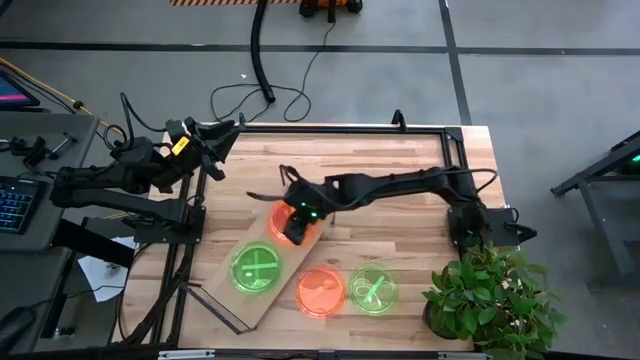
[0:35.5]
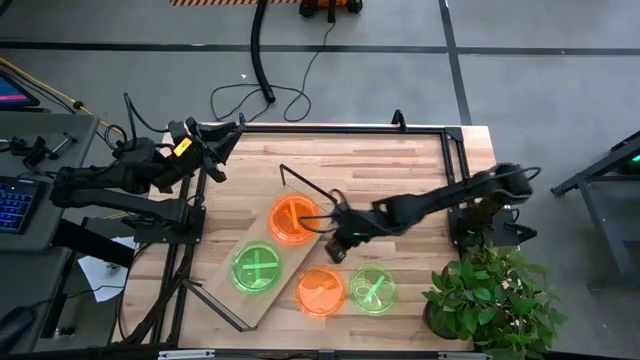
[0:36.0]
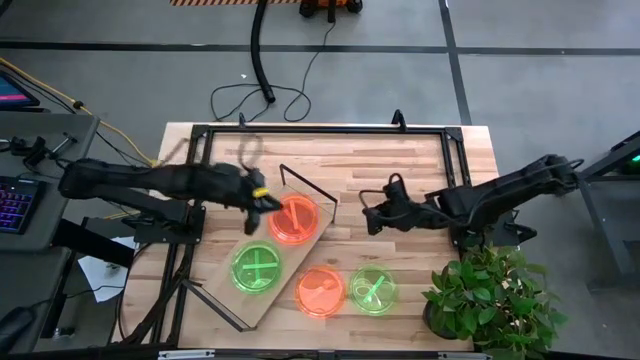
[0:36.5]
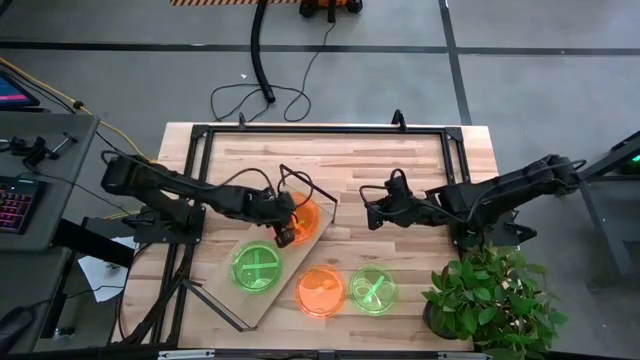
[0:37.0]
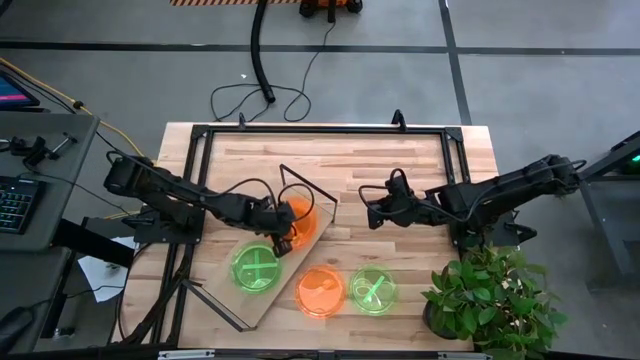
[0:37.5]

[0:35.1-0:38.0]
Task: Place and stack plates onto a shelf
Adjust the stacked orange plates on the shelf

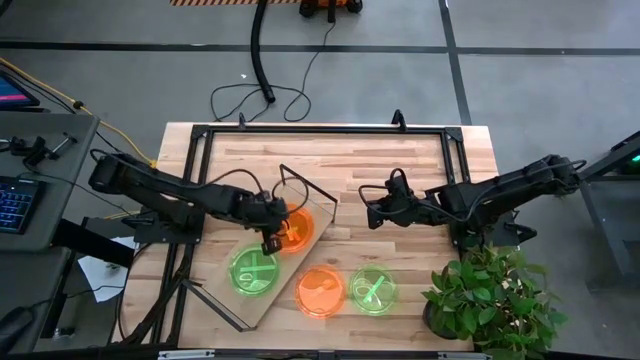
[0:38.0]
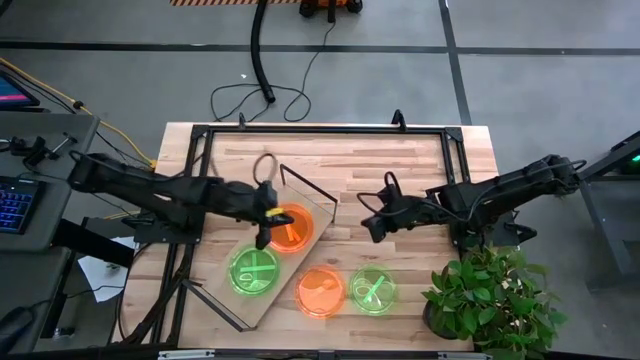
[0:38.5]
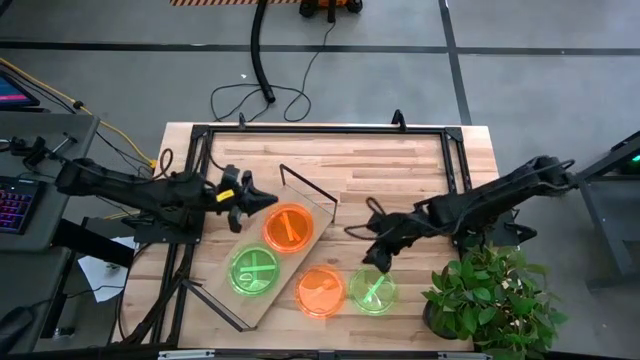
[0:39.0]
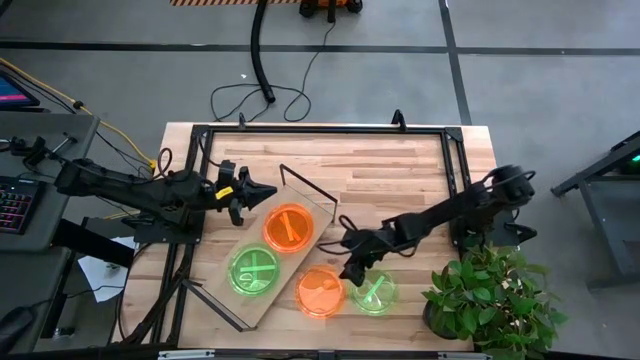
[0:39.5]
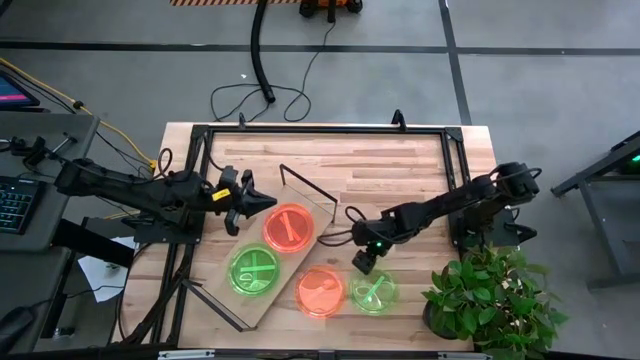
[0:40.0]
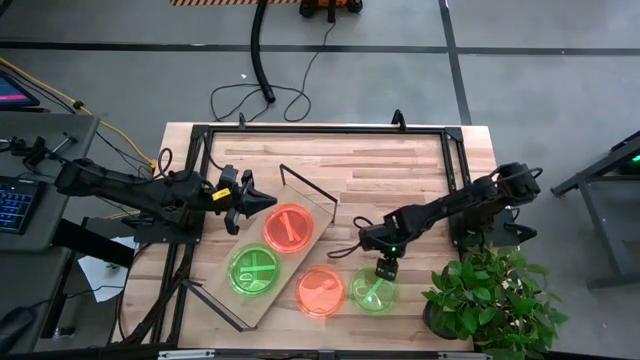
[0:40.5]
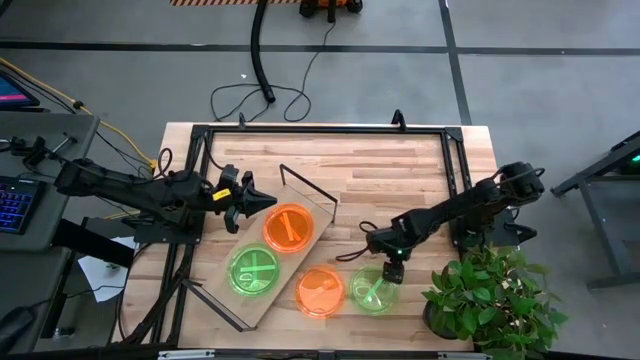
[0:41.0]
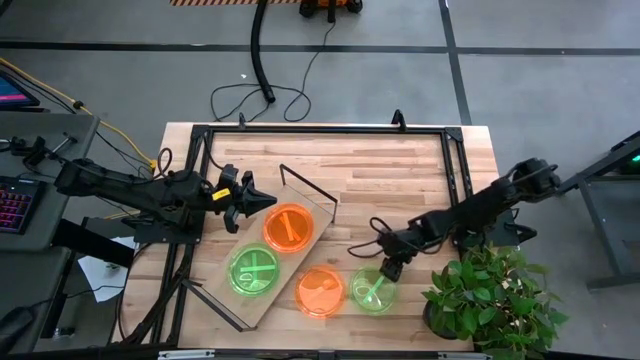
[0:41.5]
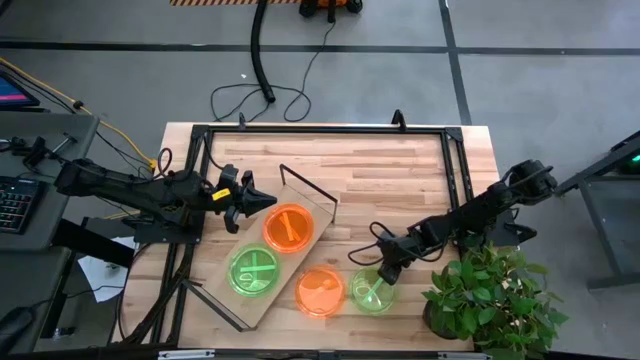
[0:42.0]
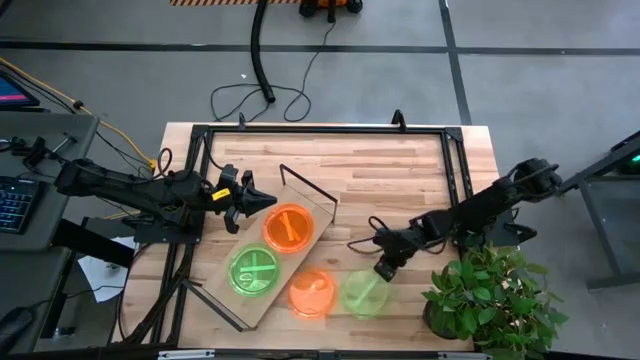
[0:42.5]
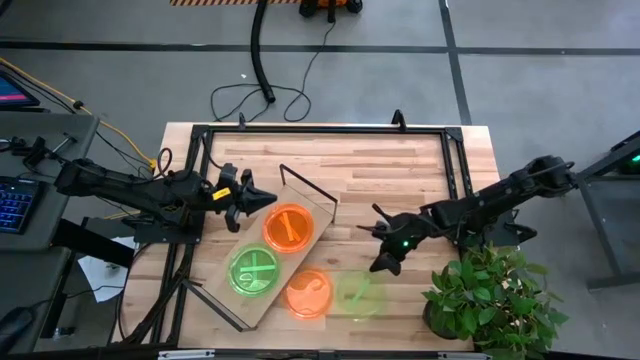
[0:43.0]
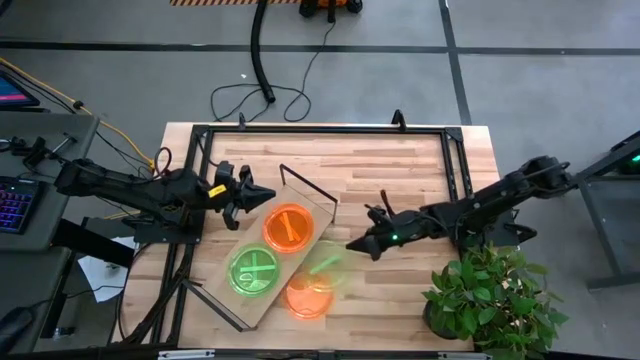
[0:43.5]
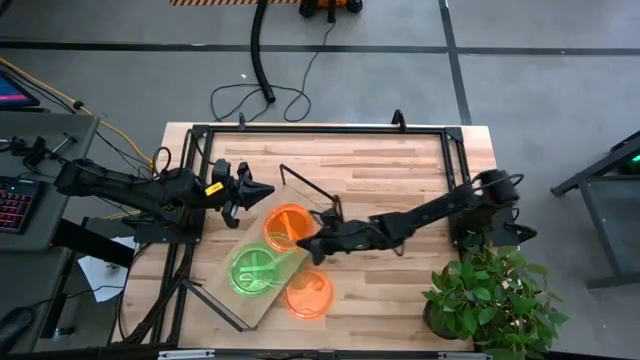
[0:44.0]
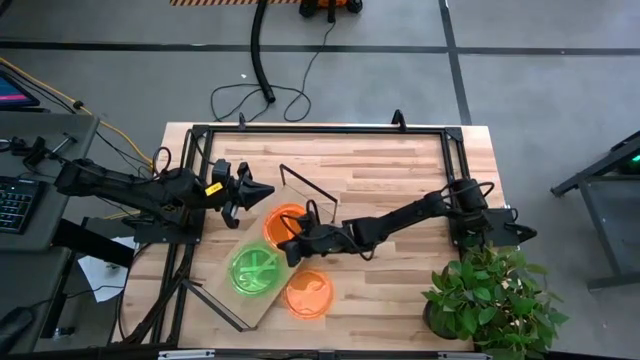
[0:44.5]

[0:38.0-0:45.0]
Stack the green plate on top of the other green plates on the shelf

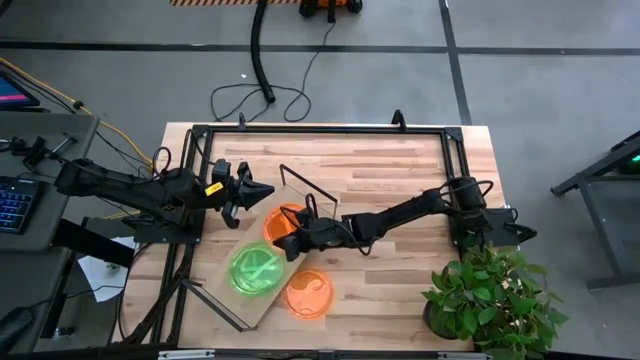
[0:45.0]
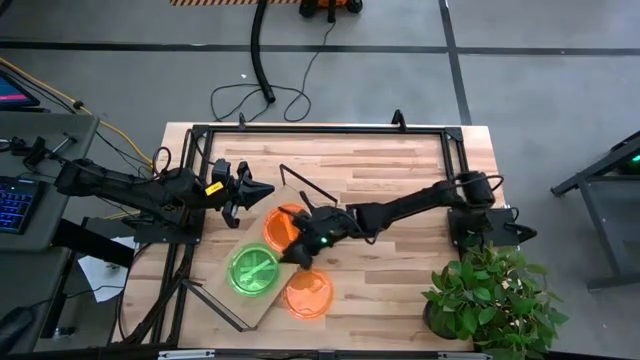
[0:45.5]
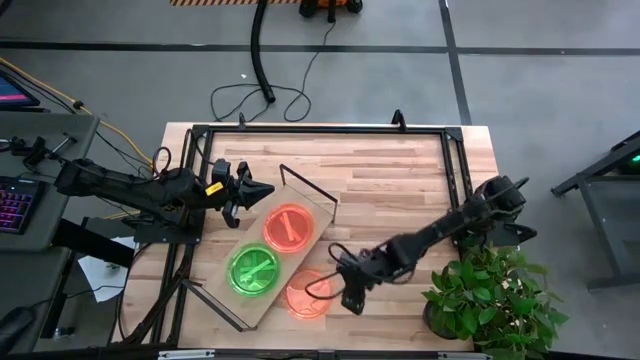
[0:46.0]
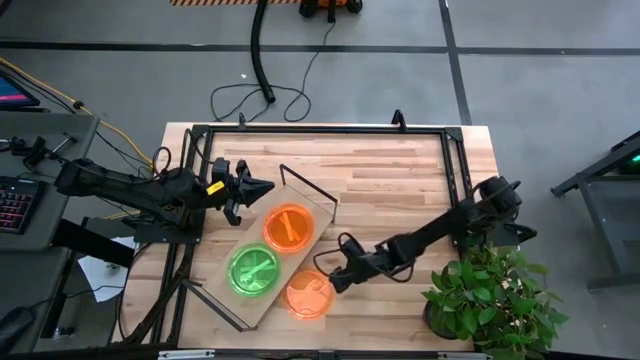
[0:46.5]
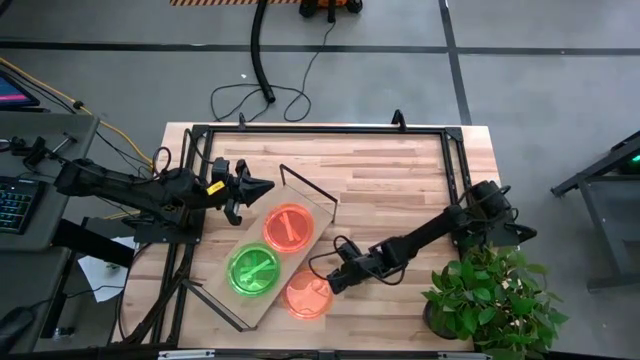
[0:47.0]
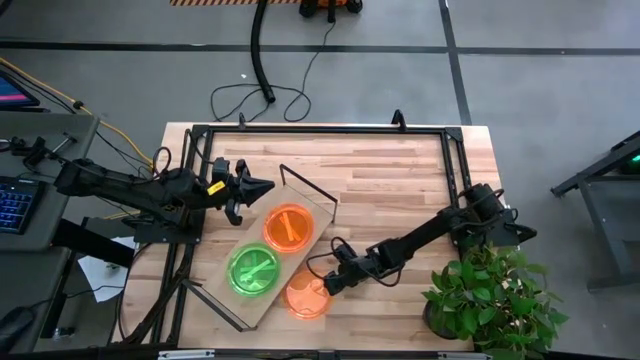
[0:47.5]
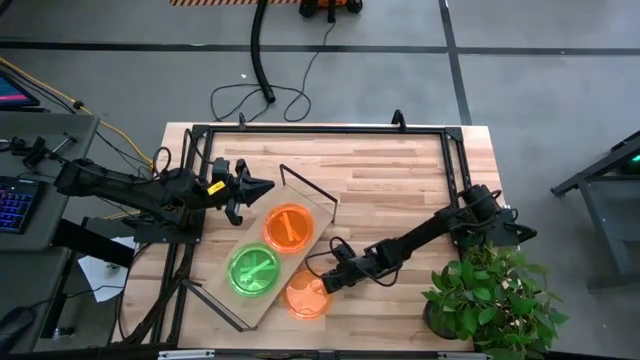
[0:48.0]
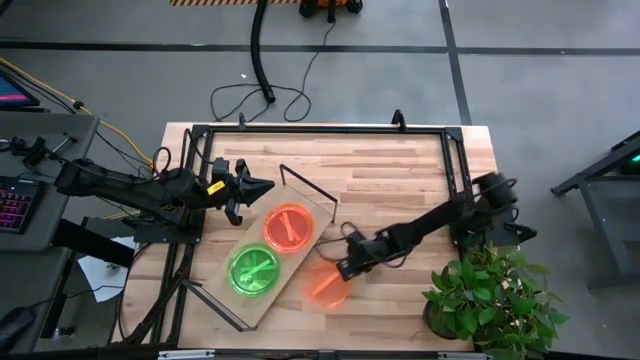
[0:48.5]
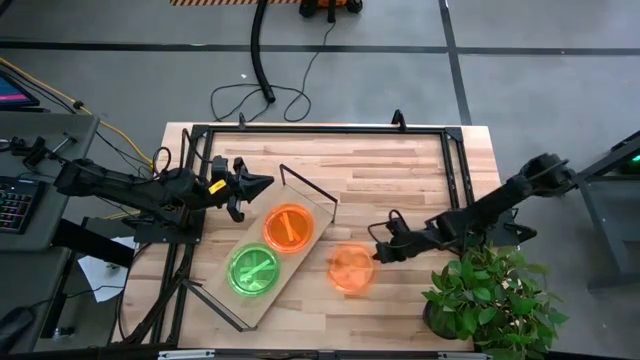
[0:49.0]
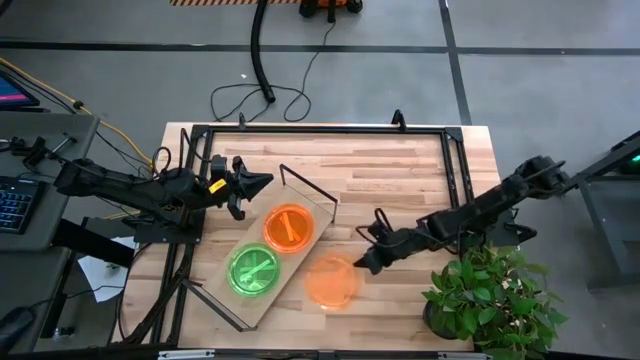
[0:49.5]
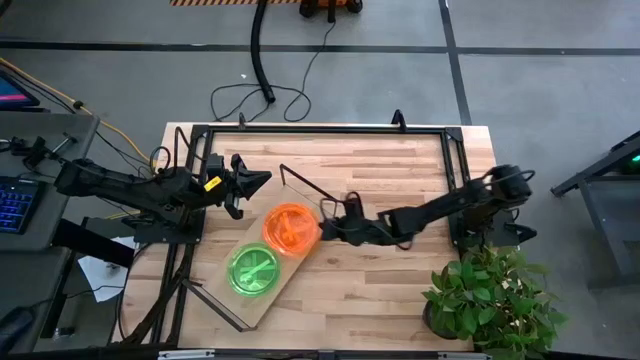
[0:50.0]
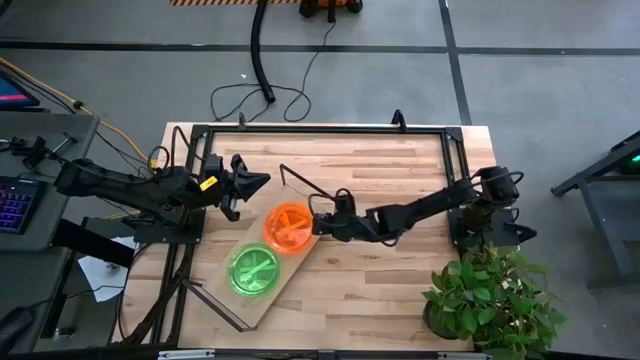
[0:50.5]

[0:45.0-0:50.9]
Stack the orange plate on top of the other orange plates on the shelf

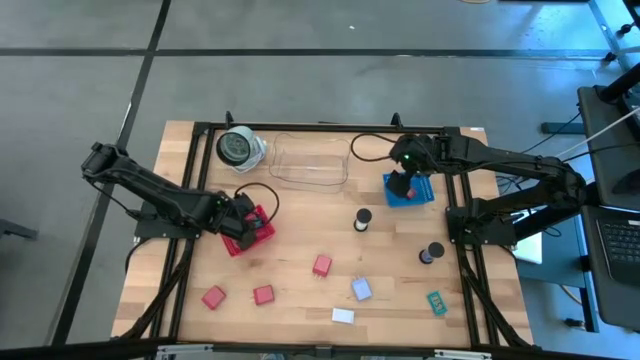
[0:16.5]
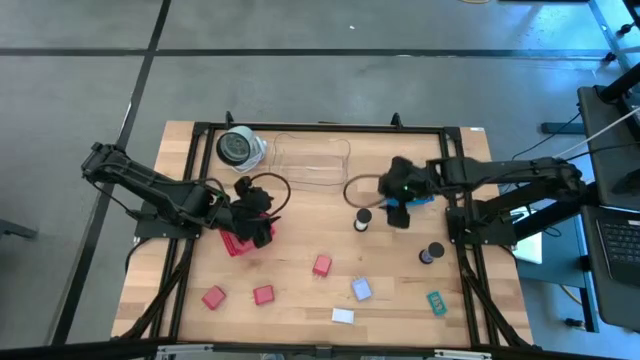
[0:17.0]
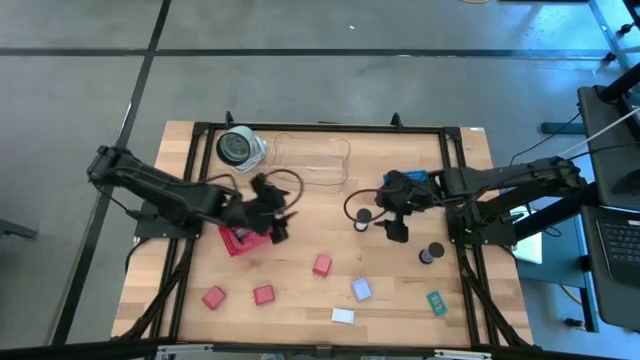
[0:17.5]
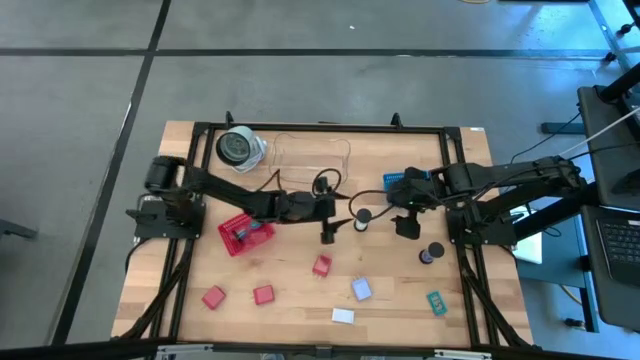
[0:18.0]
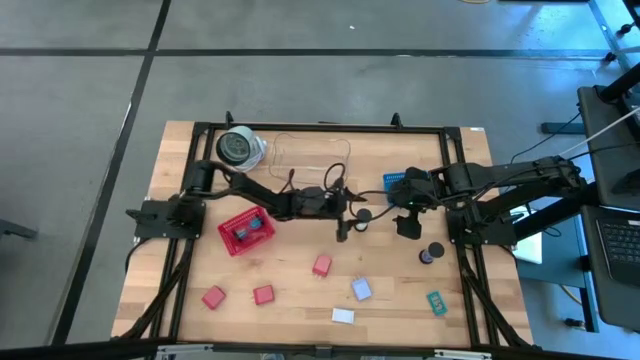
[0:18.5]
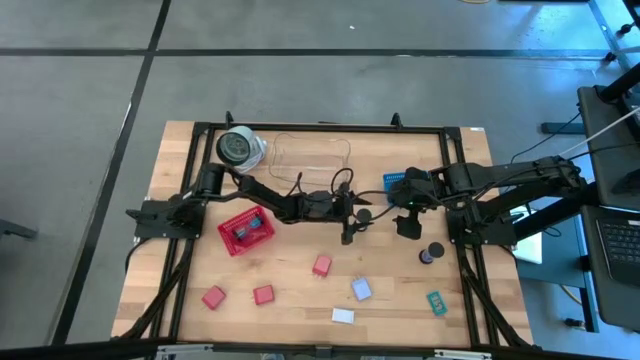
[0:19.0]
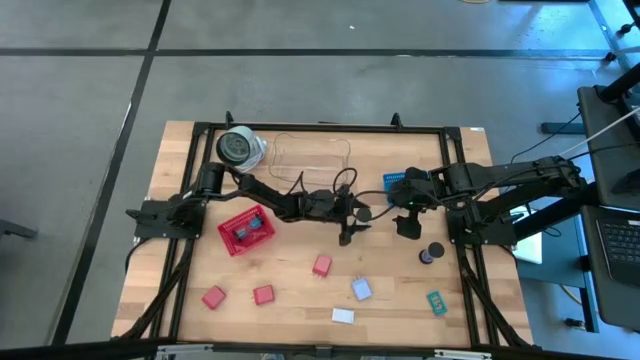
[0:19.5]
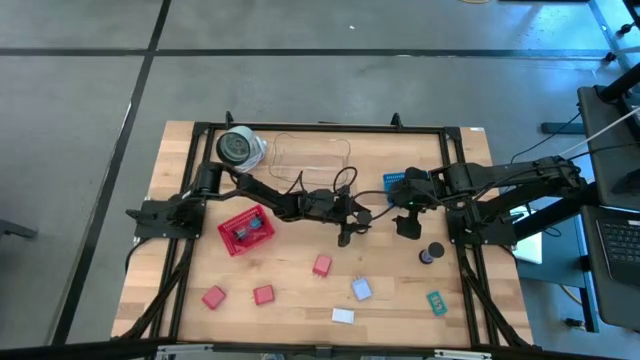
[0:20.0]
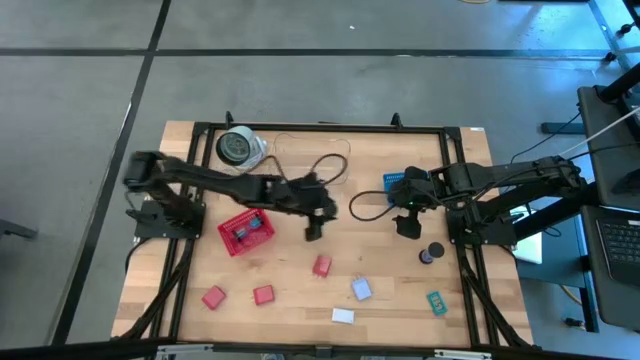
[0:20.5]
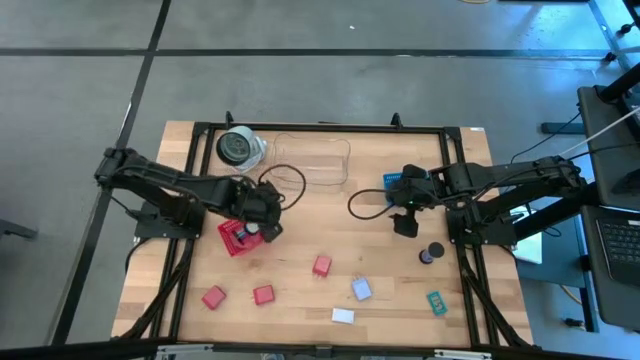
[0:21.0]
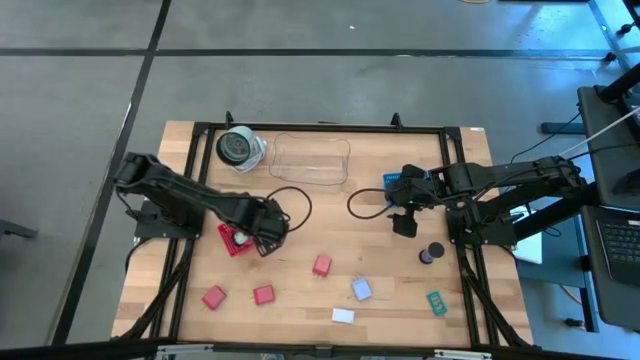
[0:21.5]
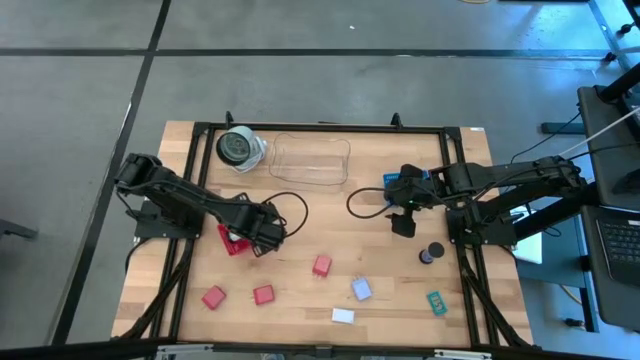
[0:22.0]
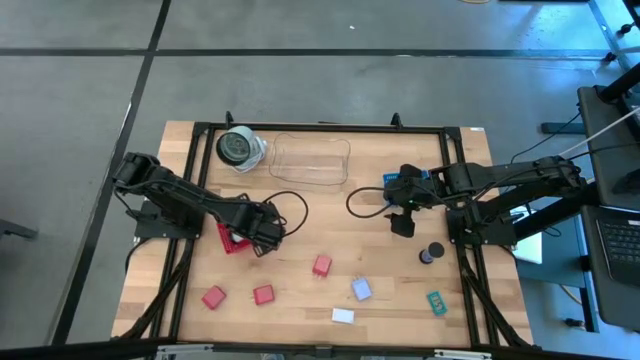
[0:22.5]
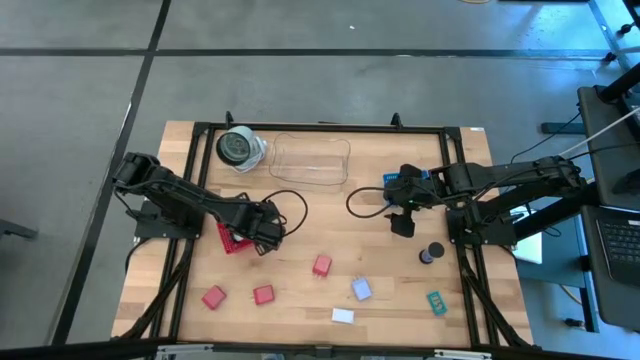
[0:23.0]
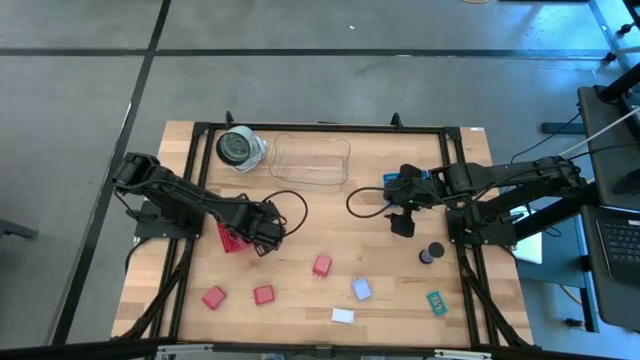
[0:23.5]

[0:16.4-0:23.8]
Task: Pick & Place Office items
Put the white hourglass into the red bin
